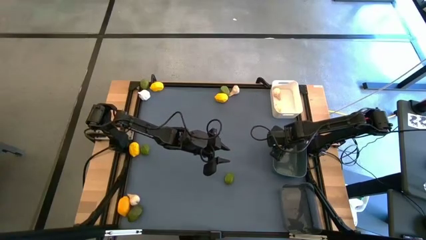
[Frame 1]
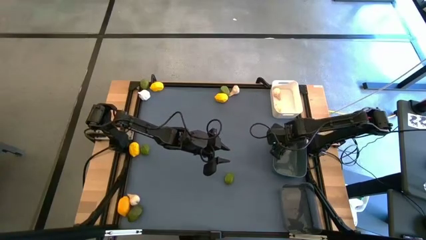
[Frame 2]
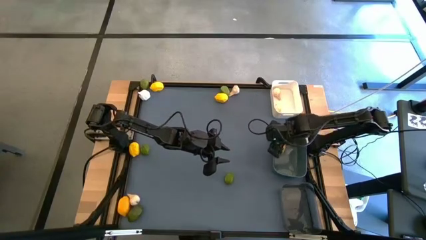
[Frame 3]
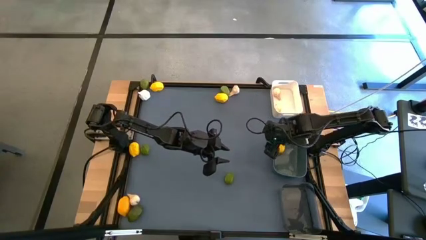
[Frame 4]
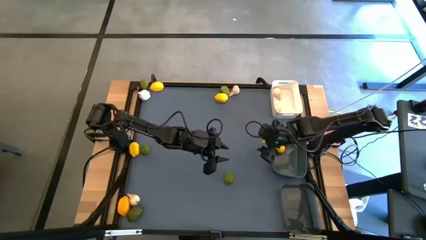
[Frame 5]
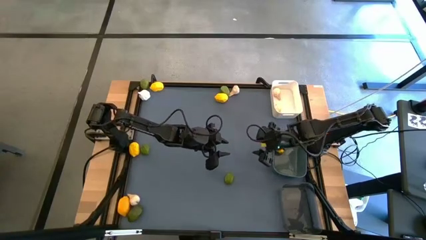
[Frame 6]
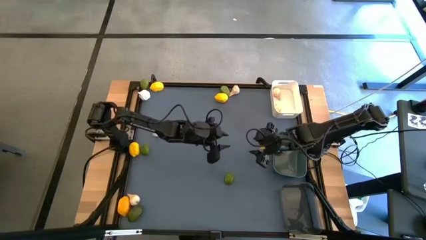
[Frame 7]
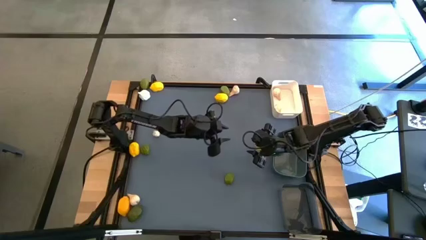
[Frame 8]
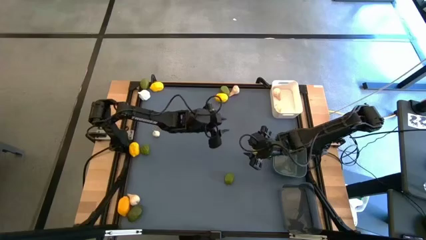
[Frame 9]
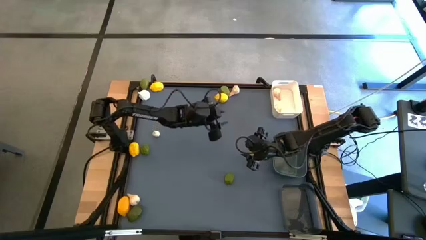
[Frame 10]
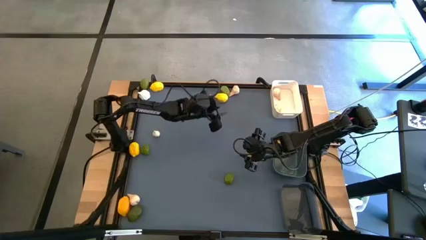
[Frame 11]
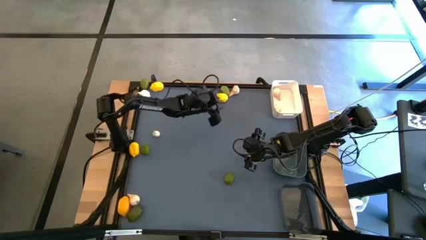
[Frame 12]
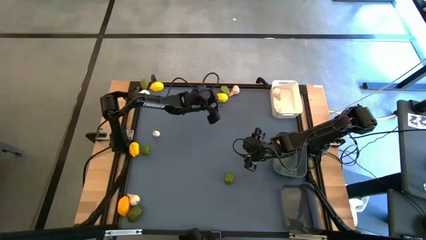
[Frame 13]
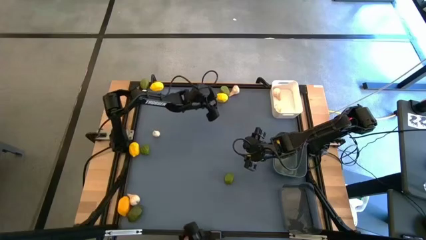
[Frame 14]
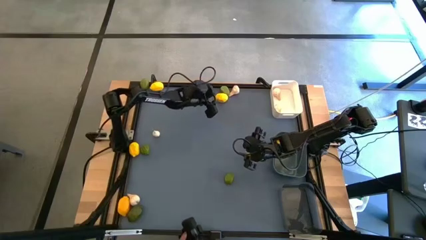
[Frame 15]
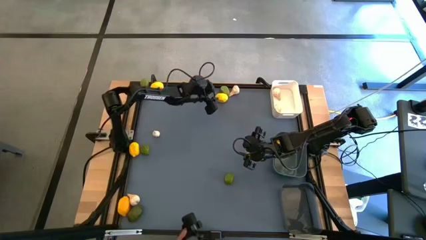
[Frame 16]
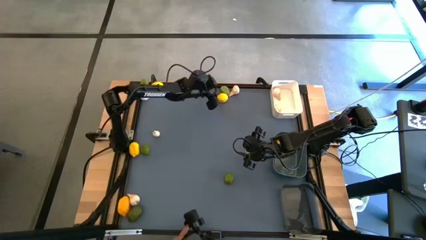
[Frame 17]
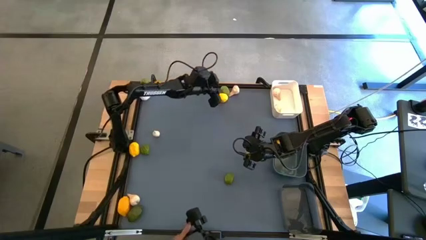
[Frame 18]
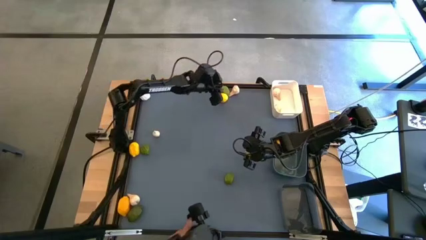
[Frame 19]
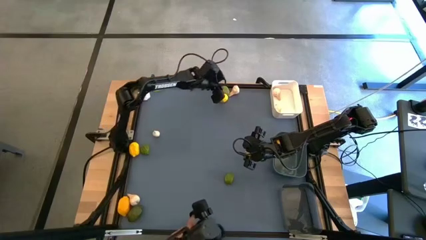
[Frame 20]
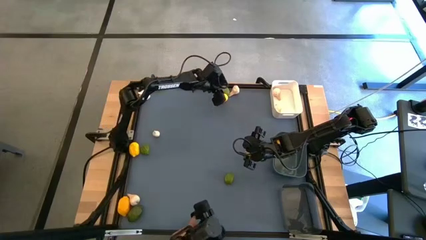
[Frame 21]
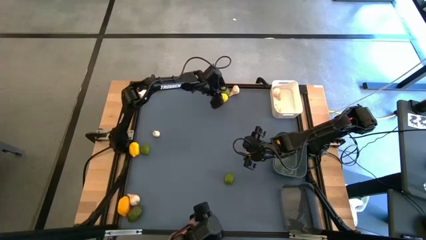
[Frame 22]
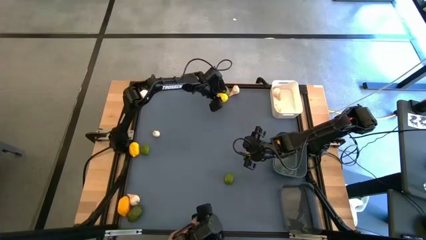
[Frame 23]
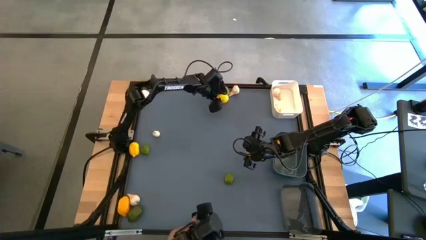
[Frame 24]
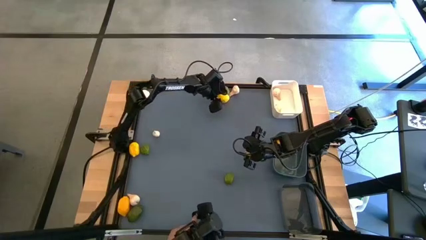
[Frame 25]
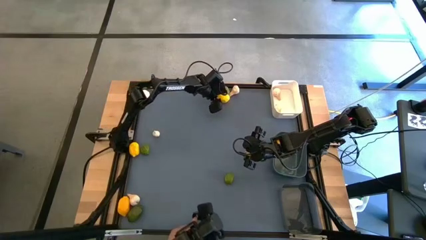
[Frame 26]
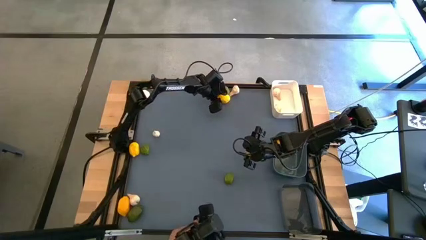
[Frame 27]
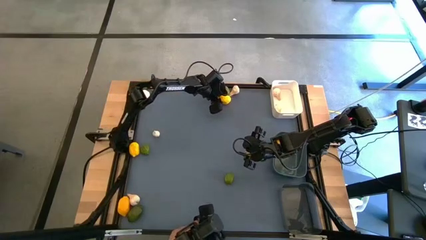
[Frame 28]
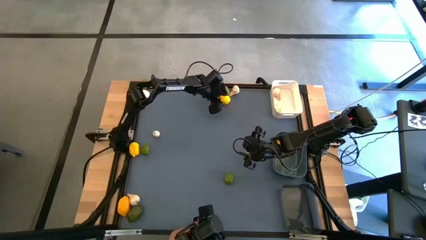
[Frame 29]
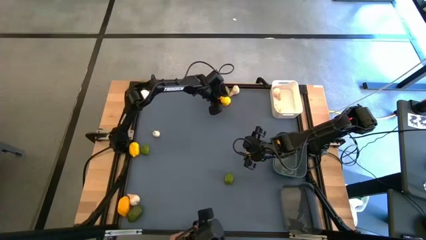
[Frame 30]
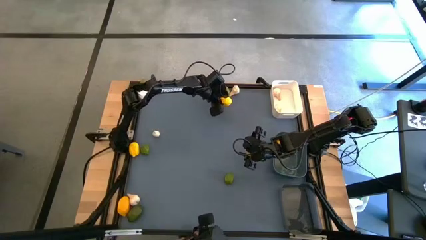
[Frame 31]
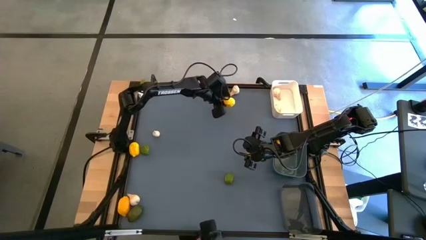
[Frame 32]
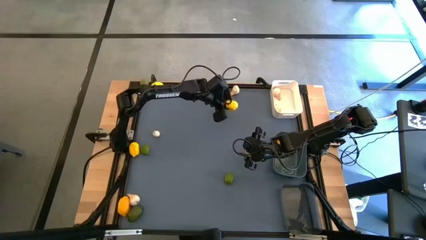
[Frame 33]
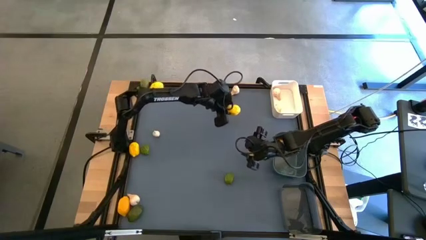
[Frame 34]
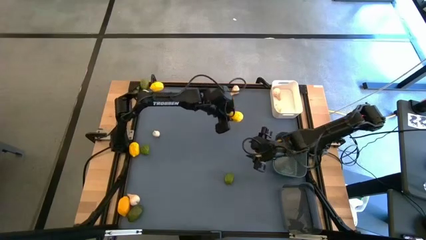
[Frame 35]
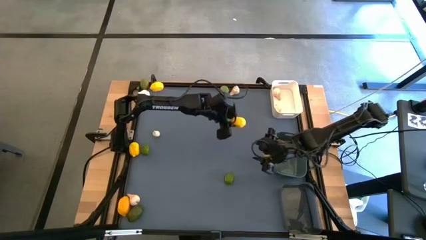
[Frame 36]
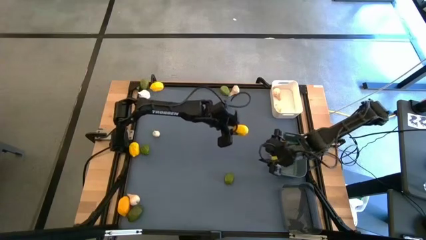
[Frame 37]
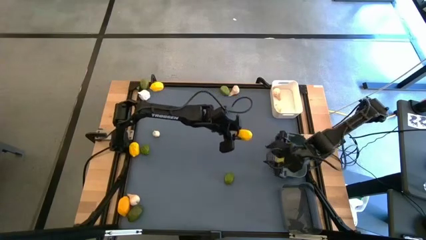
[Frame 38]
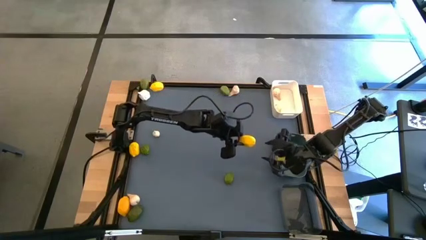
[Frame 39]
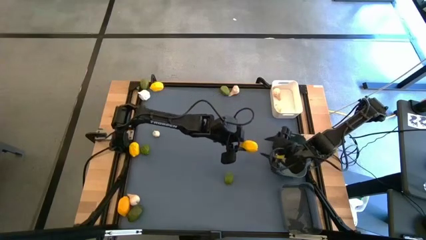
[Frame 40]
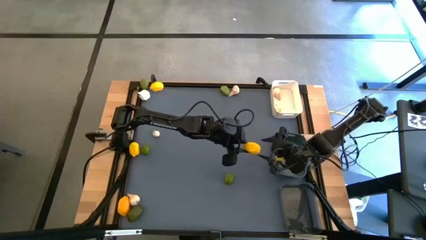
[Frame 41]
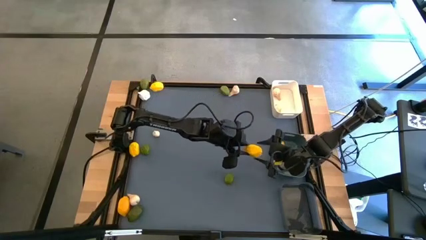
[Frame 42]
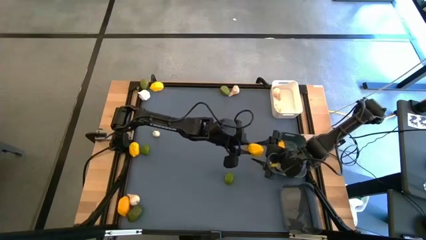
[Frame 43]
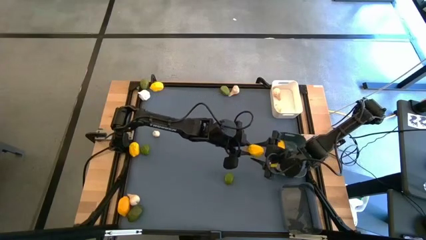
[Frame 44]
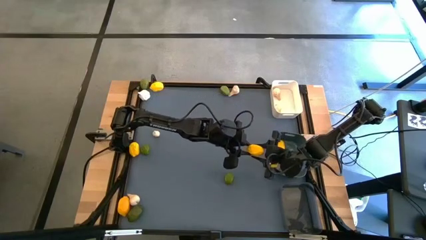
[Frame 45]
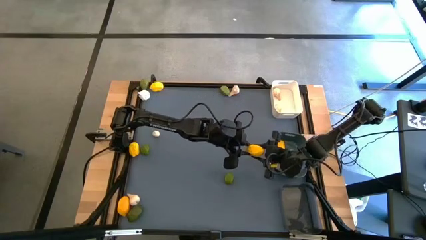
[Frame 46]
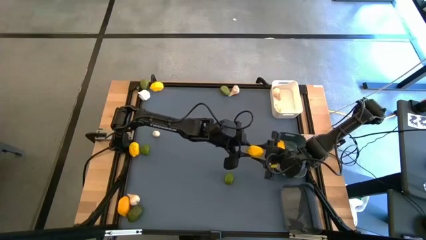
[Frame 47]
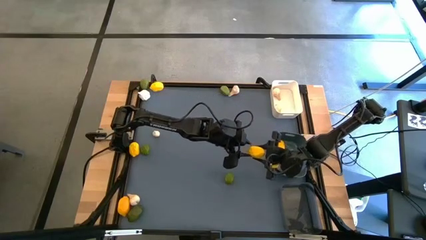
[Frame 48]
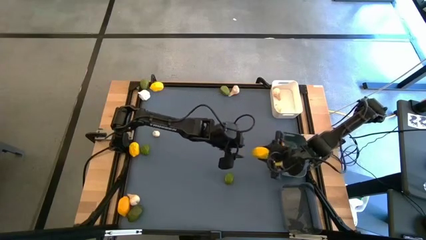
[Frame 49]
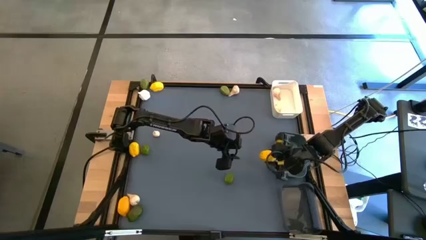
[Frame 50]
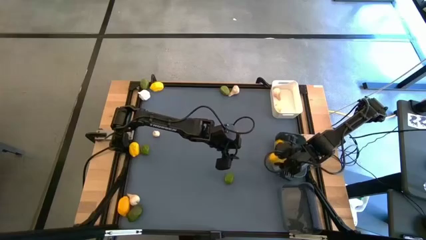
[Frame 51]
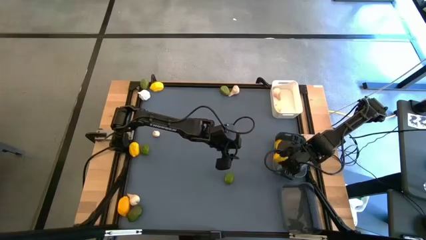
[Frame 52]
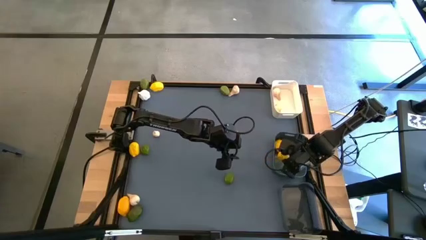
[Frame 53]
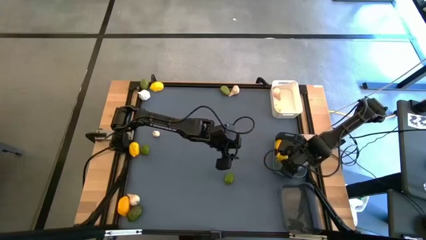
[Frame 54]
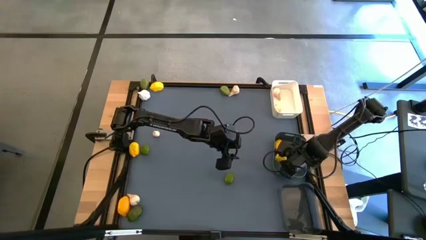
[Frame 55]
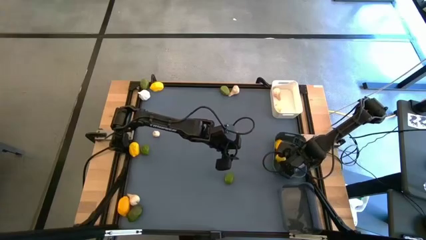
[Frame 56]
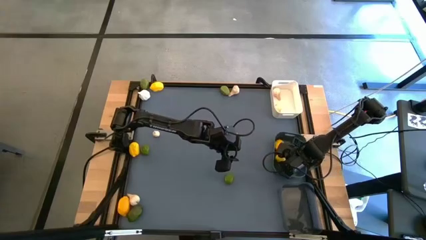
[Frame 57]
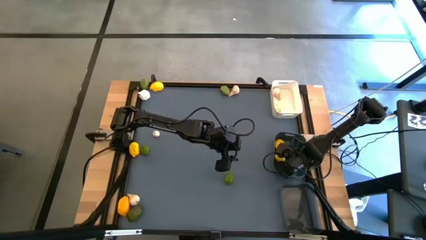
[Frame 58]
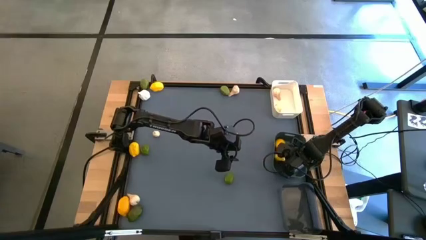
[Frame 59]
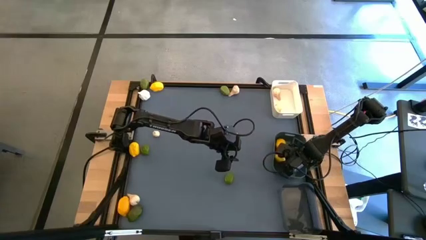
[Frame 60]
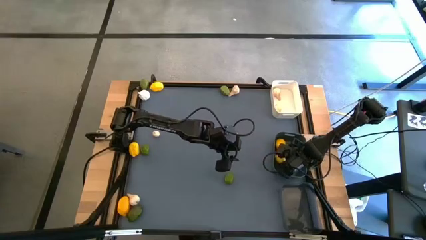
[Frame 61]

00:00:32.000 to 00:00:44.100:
Task: Sort produce into baskets
Put the yellow lemon into the gray bin

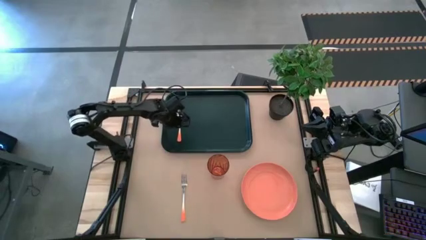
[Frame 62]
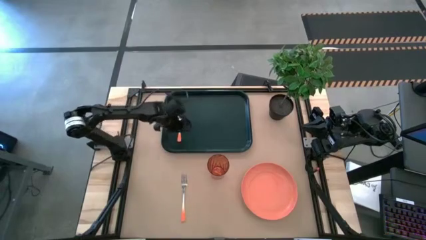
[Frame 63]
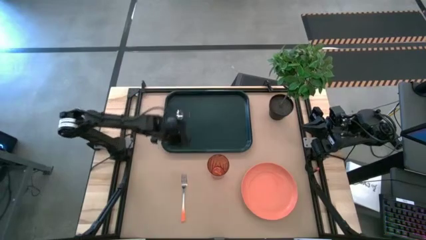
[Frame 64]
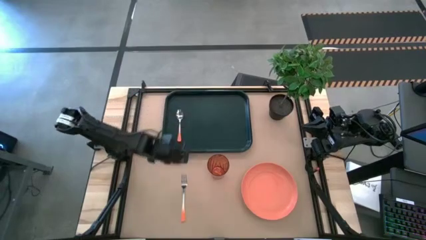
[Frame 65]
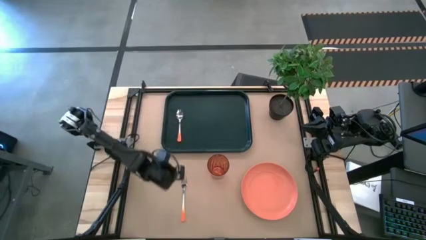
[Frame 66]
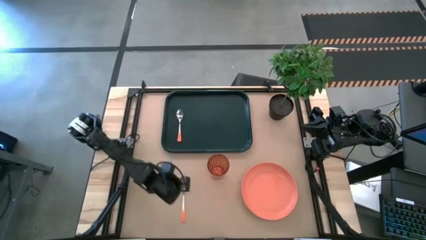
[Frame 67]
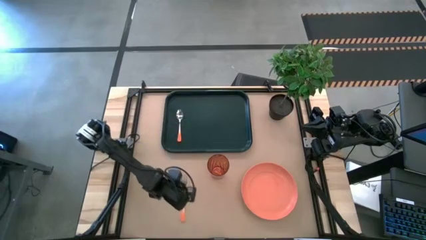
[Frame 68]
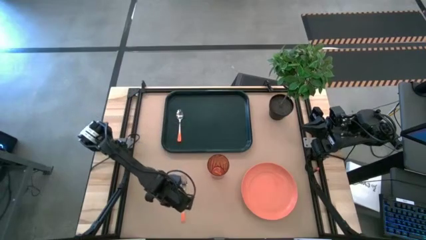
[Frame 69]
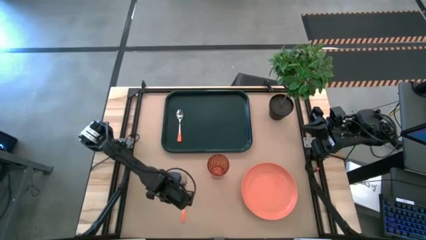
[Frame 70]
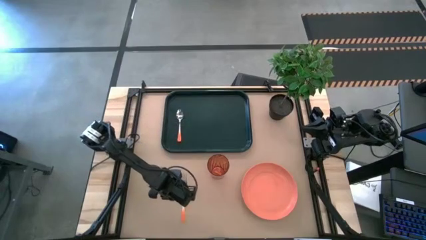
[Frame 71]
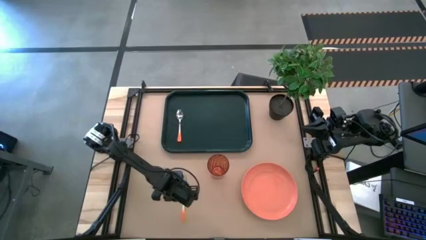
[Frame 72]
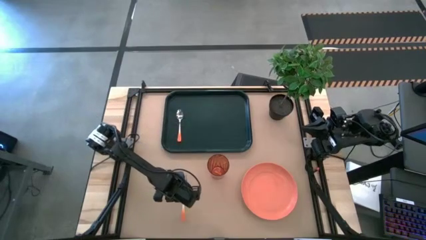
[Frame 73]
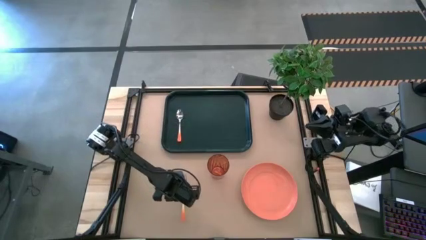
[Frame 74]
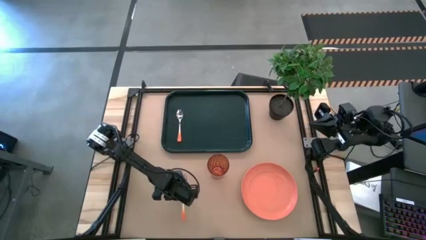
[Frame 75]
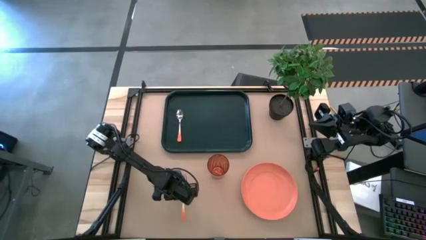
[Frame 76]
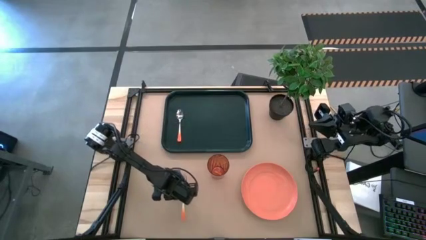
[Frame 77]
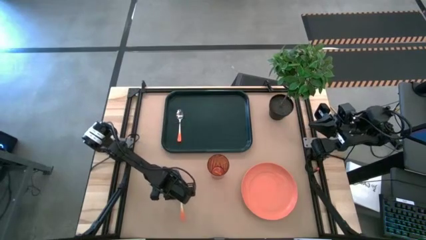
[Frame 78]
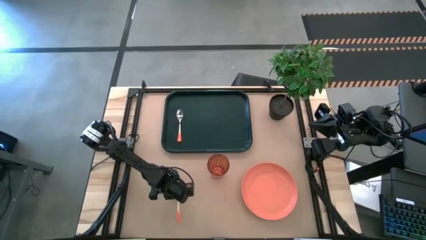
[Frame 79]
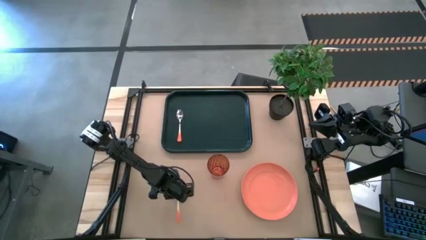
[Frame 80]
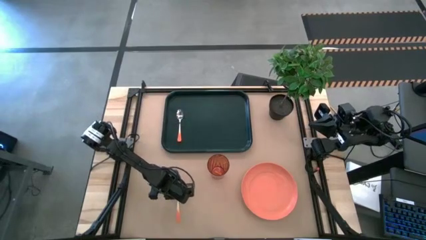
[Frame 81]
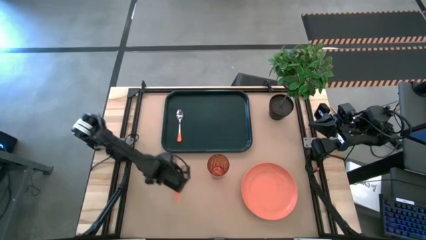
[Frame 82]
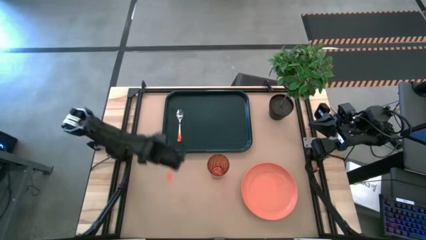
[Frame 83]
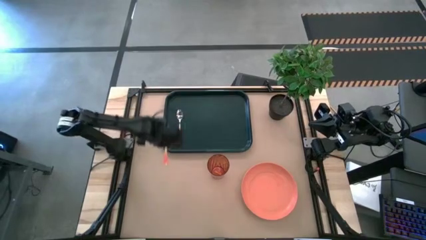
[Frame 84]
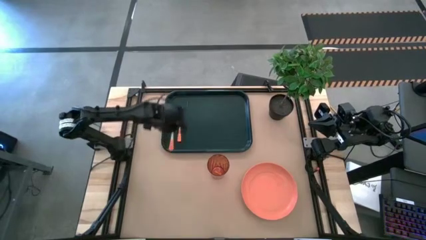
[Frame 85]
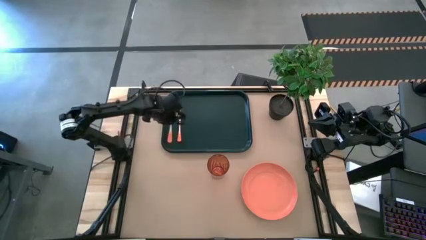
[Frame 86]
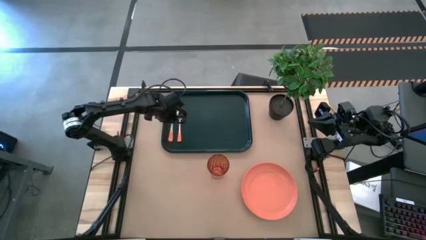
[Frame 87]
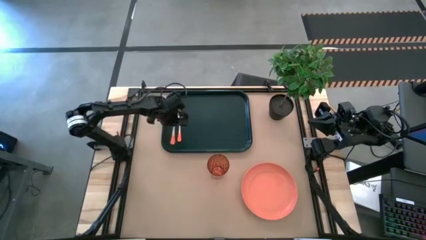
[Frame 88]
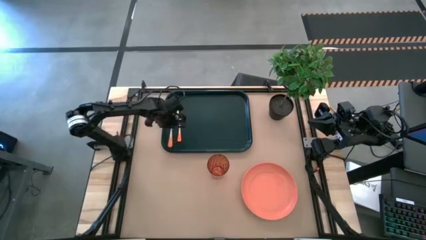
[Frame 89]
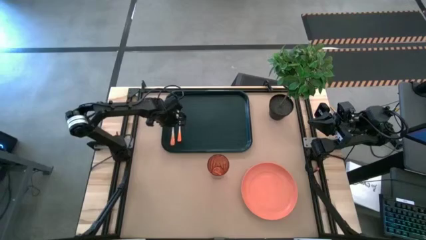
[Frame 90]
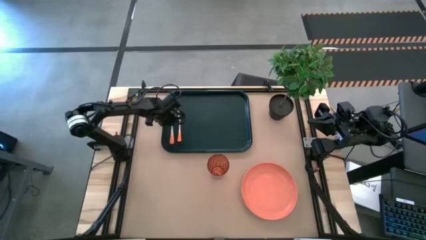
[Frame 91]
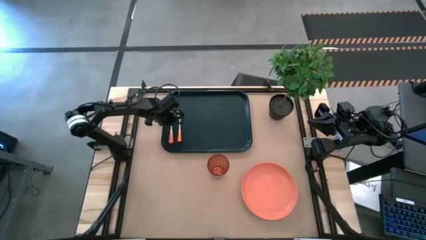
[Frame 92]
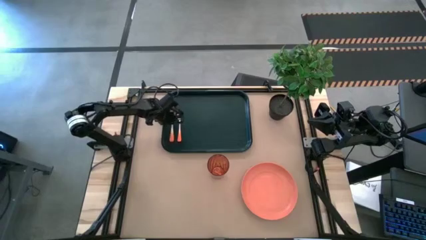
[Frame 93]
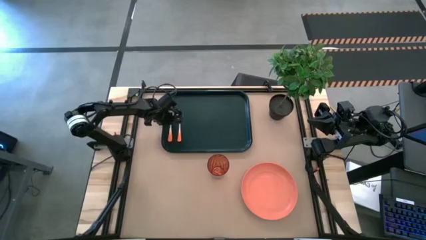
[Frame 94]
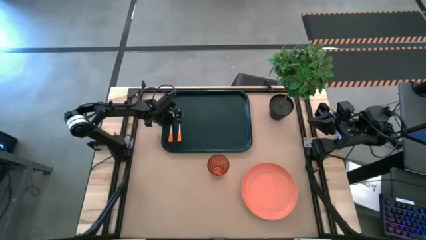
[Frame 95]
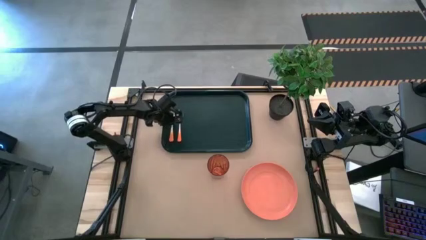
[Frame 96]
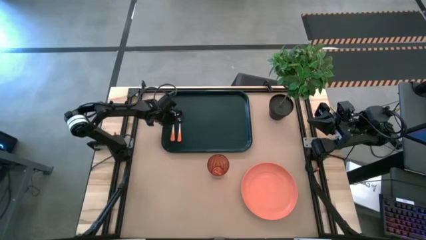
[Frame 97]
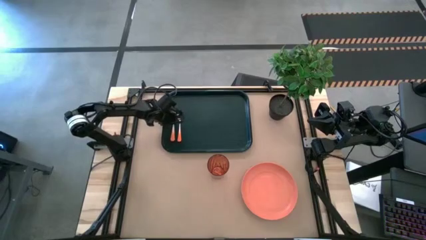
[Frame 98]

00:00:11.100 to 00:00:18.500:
Task: Pick and place plate/cup/fork/spoon on tray
Put the orange fork on the black serving tray to the left of the orange spoon
